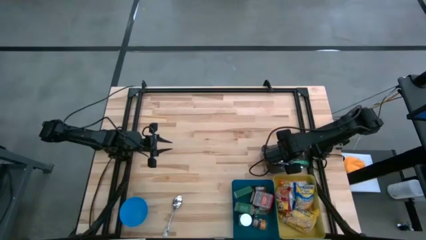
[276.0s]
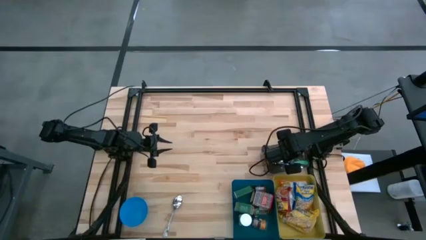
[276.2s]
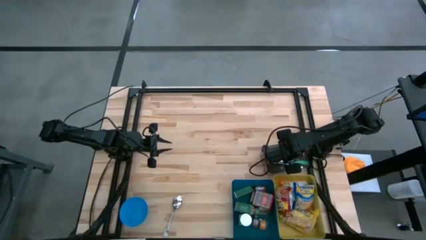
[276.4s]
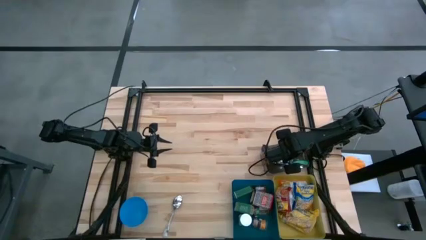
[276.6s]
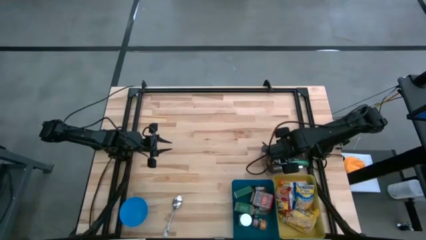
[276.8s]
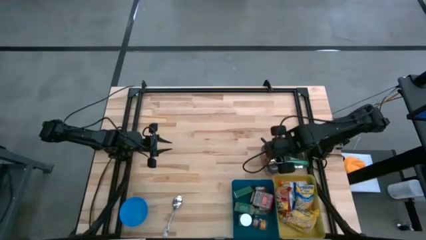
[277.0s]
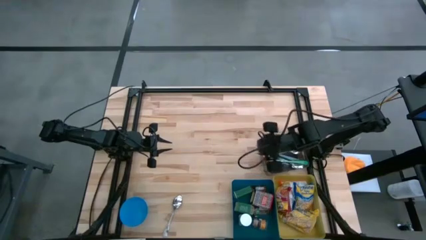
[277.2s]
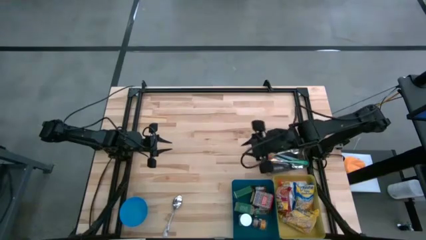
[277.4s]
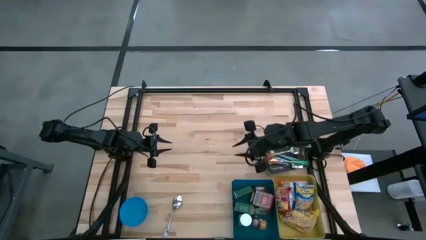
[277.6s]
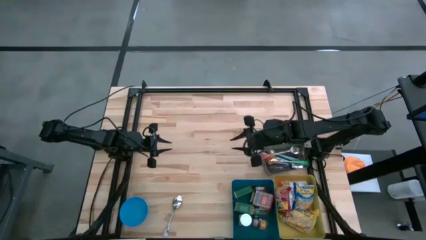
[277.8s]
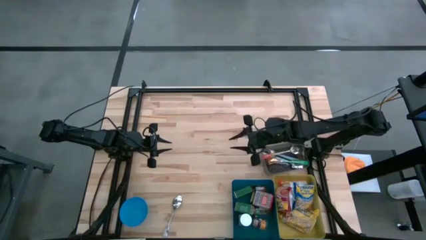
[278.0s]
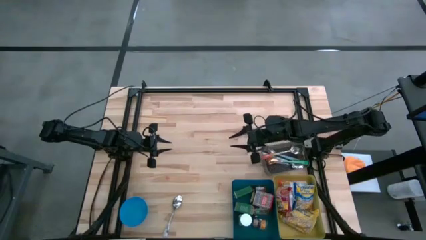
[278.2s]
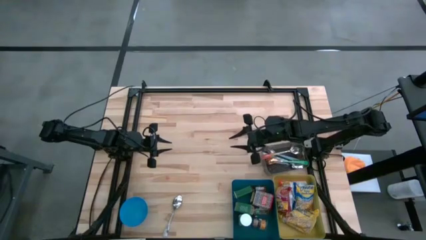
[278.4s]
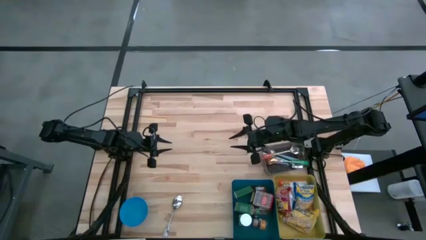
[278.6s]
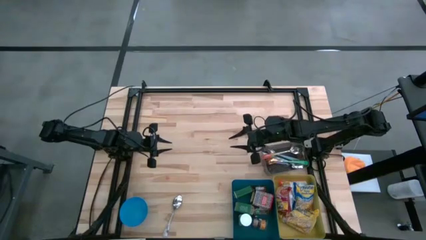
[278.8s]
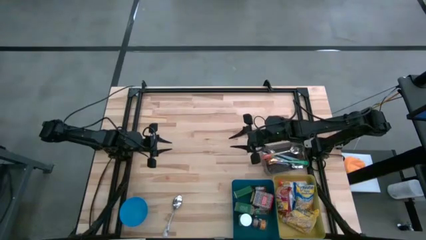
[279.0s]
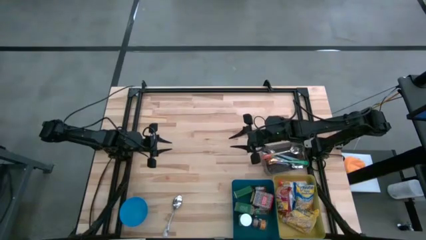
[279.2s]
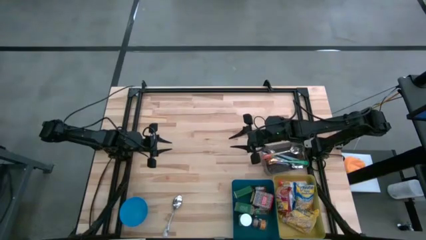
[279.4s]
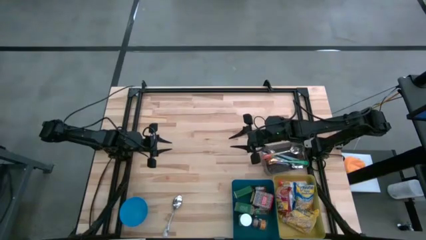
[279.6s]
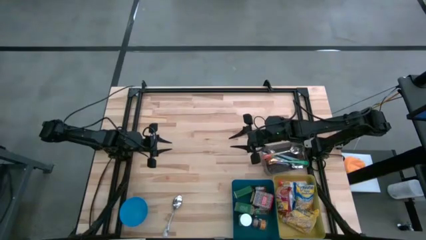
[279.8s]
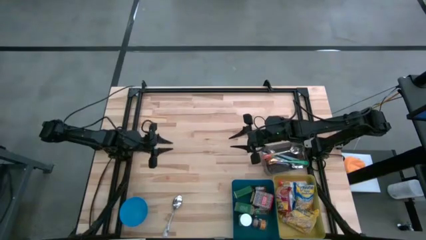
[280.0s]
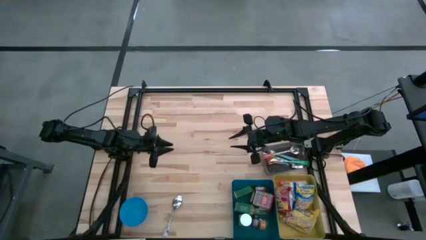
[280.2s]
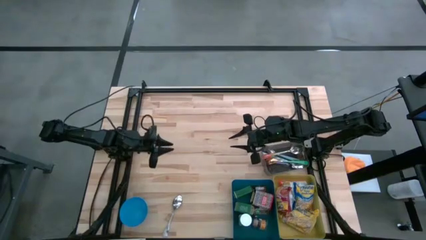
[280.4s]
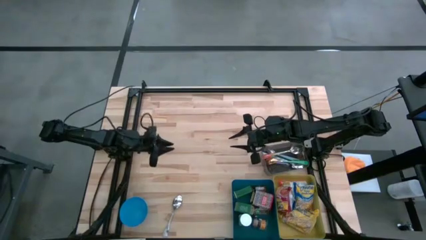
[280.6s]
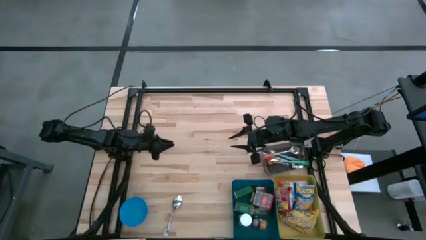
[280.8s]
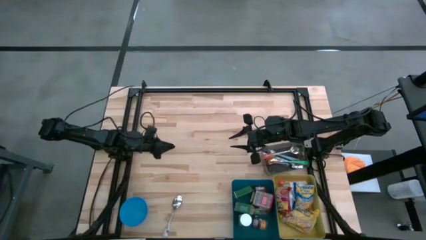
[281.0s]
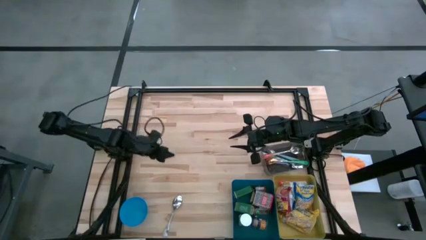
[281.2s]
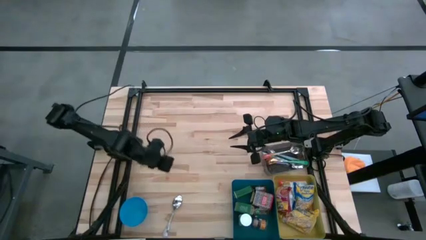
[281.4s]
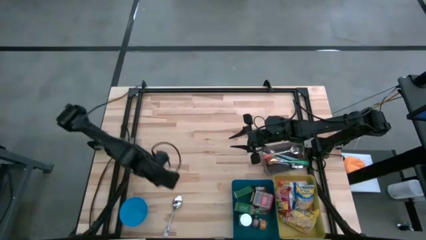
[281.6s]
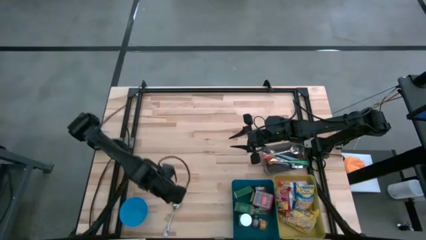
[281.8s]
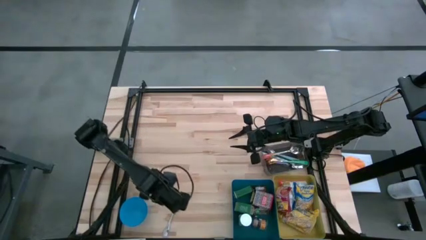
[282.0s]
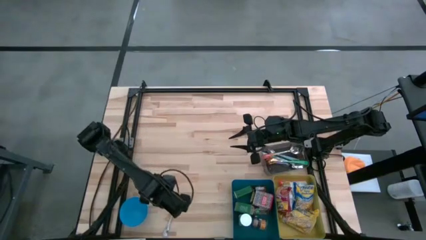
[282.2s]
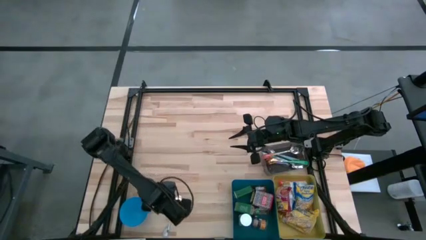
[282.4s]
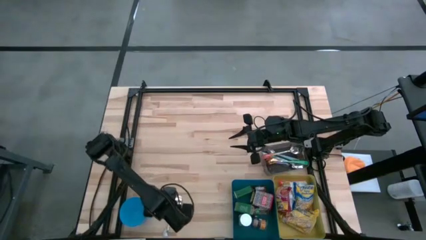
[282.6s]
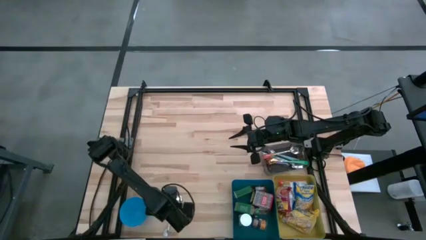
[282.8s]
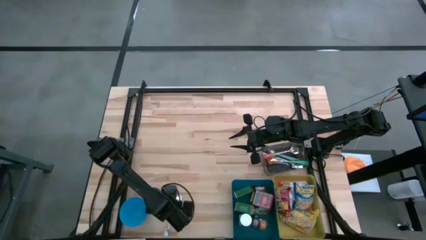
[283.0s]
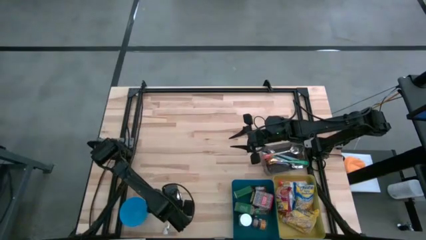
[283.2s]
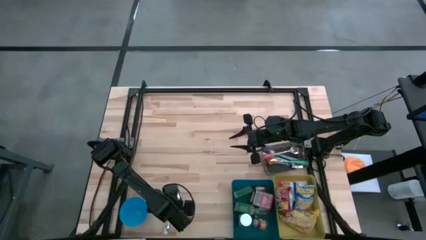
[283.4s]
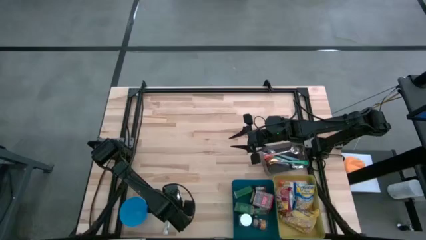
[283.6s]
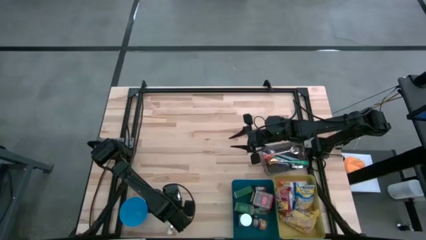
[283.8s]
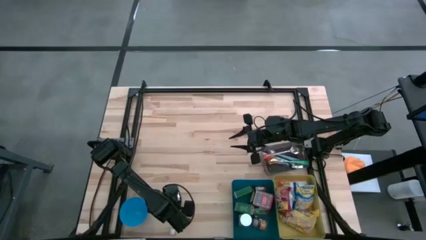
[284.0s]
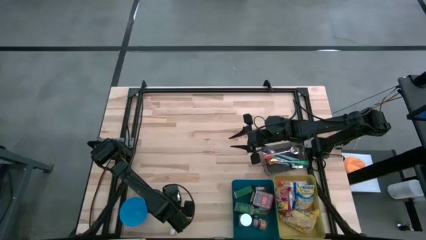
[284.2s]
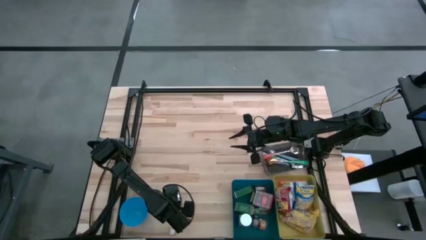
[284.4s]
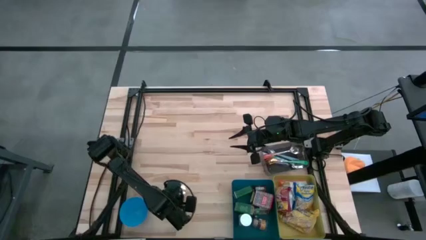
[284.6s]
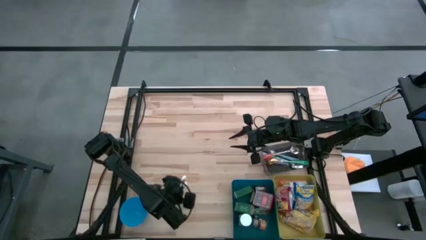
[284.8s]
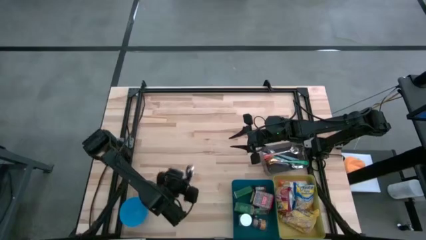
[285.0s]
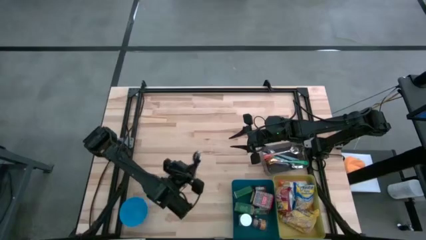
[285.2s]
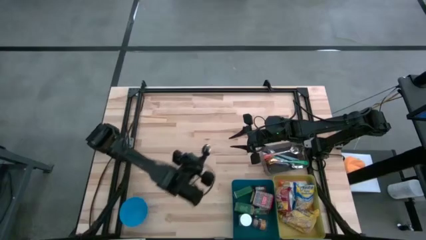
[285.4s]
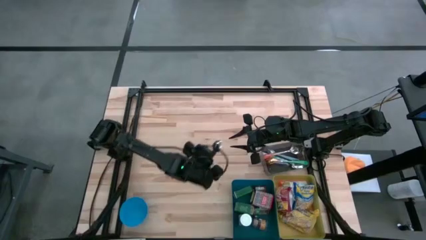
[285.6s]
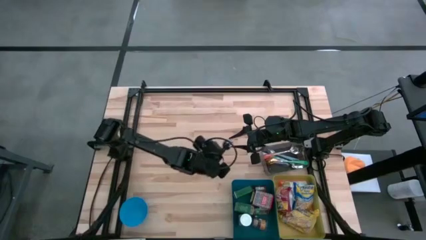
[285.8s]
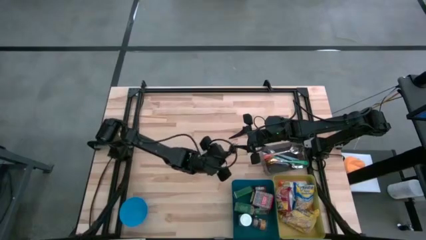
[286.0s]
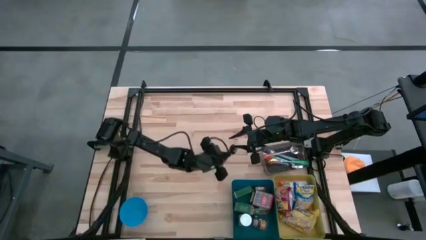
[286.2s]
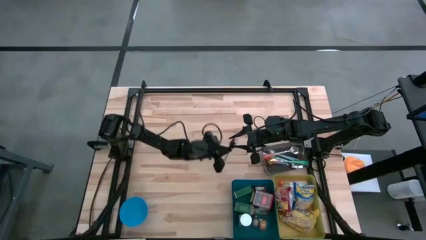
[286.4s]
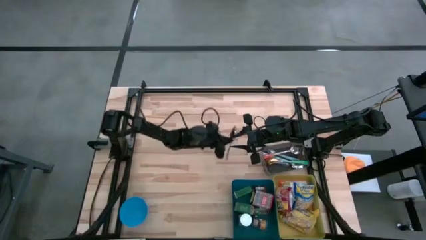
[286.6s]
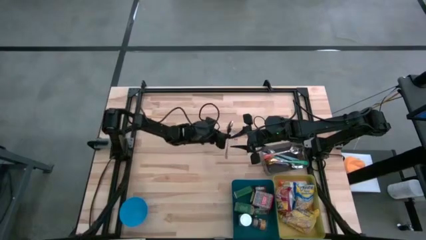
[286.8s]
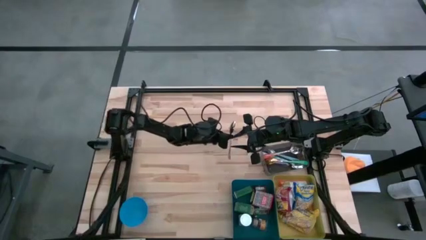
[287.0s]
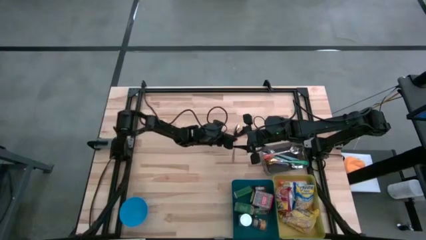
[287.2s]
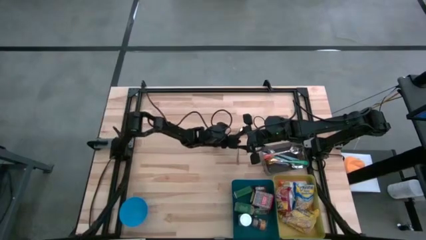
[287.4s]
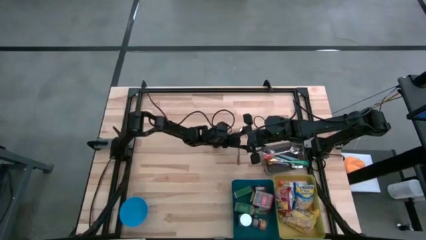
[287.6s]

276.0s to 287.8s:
Put the silver spoon into the black bin
